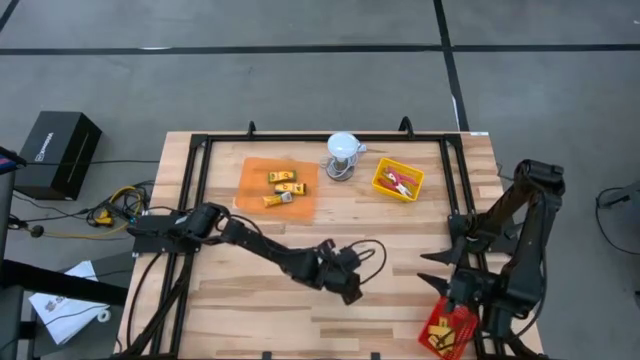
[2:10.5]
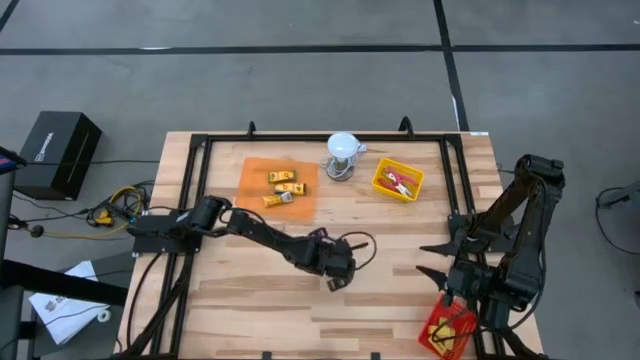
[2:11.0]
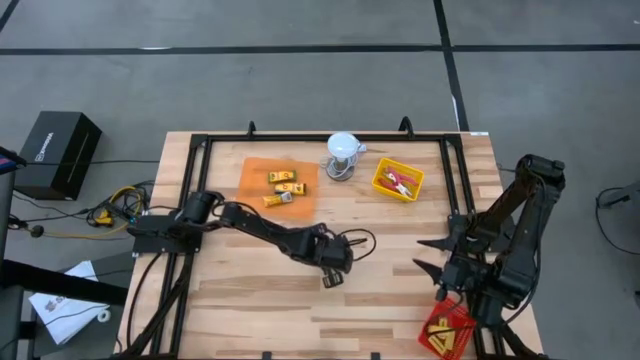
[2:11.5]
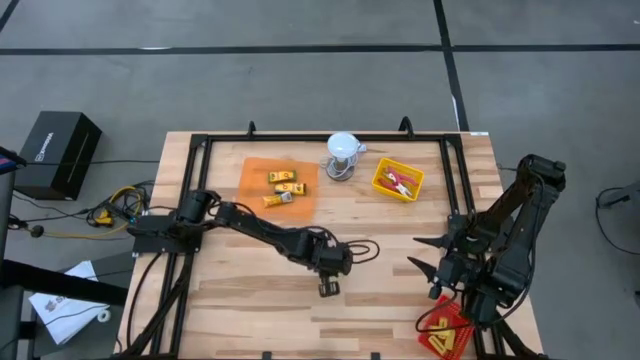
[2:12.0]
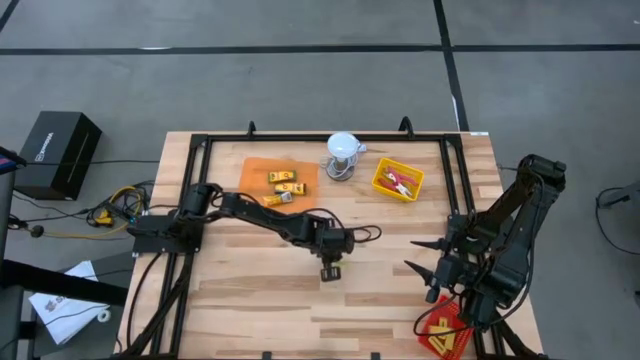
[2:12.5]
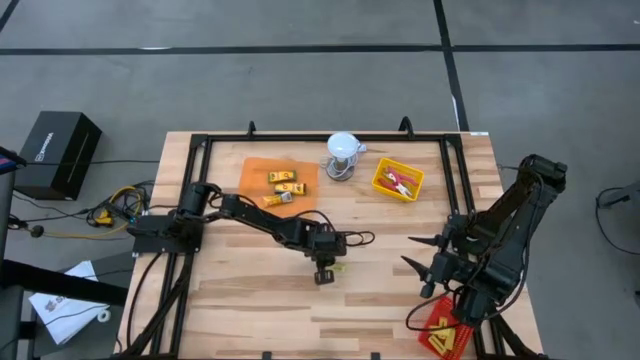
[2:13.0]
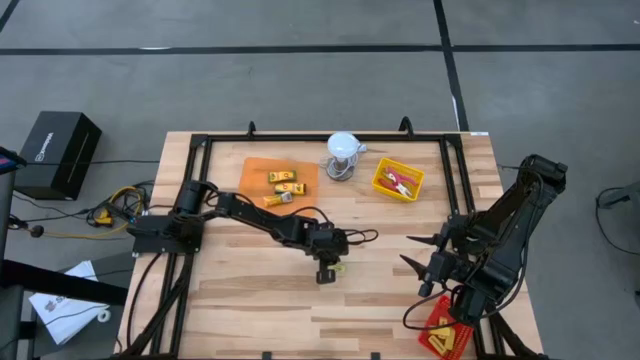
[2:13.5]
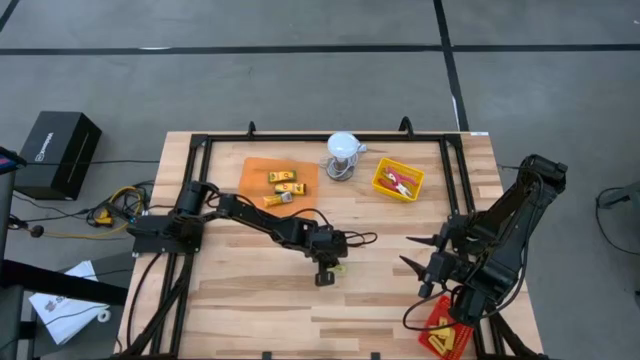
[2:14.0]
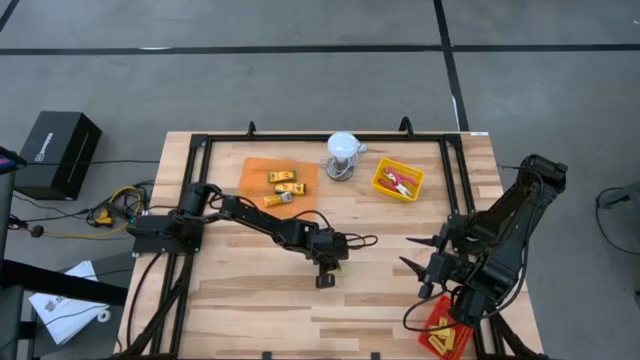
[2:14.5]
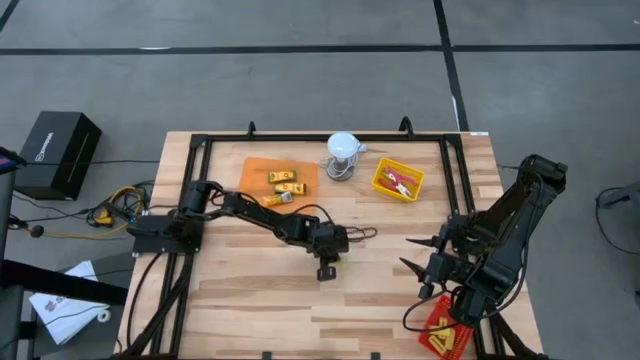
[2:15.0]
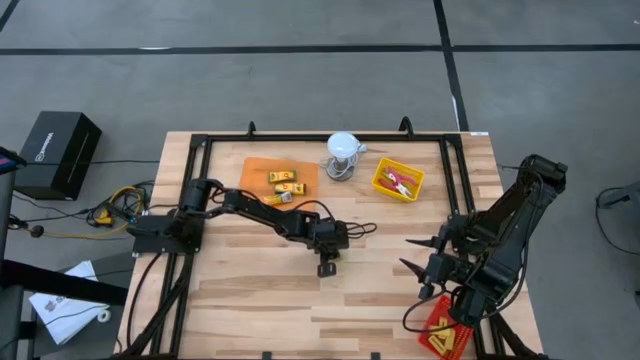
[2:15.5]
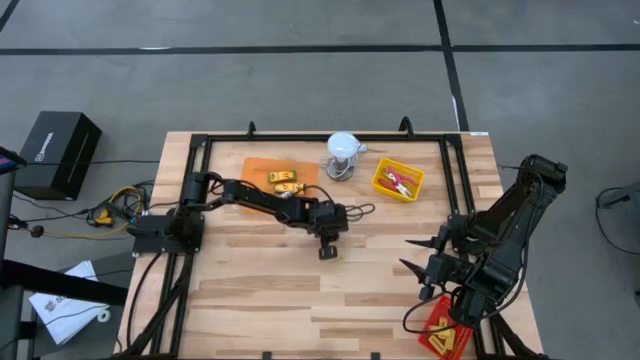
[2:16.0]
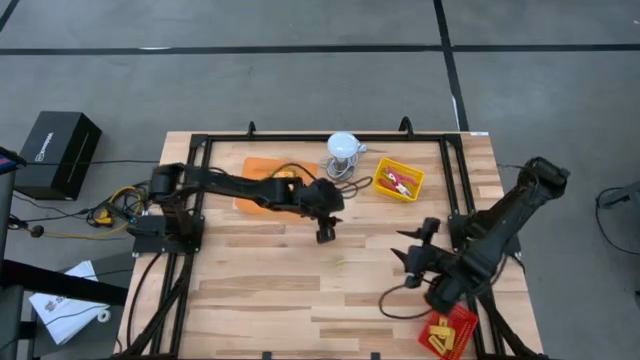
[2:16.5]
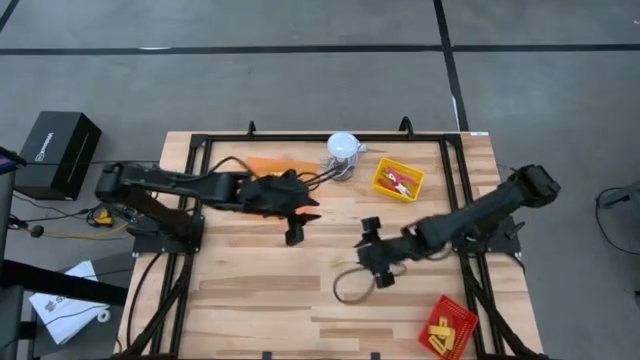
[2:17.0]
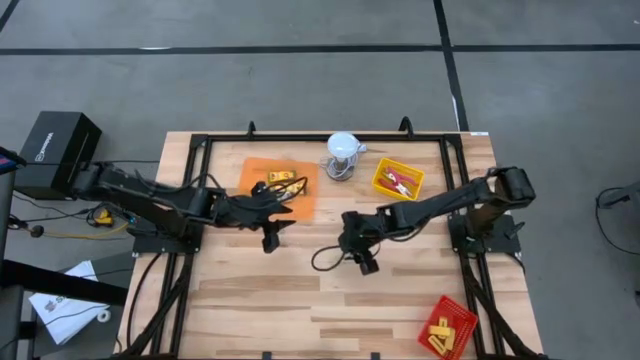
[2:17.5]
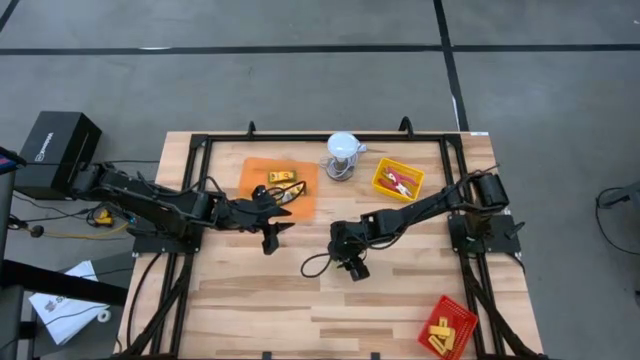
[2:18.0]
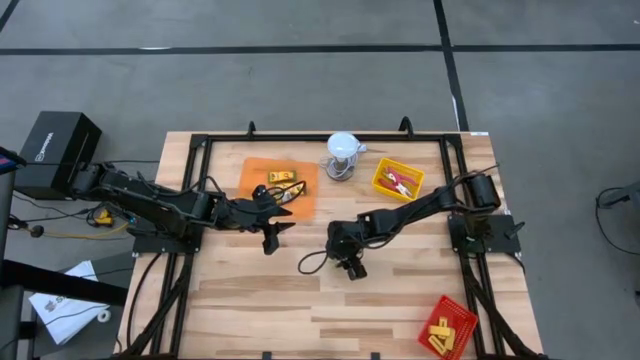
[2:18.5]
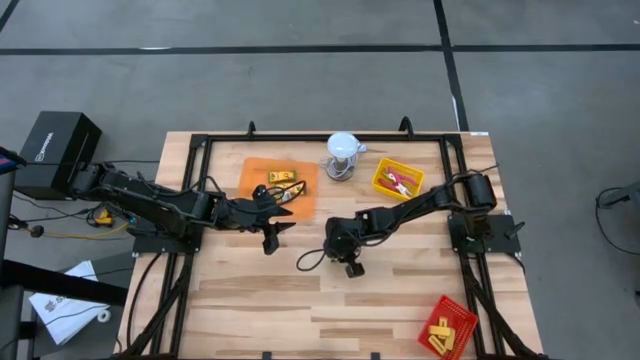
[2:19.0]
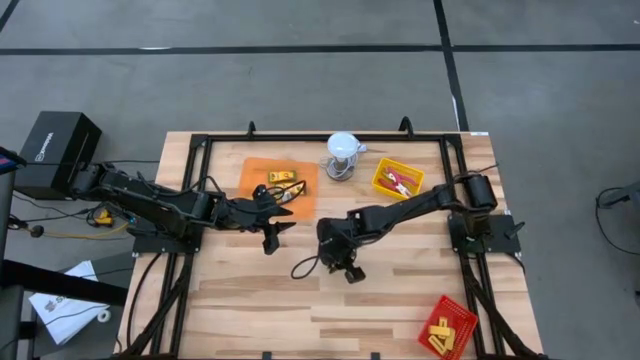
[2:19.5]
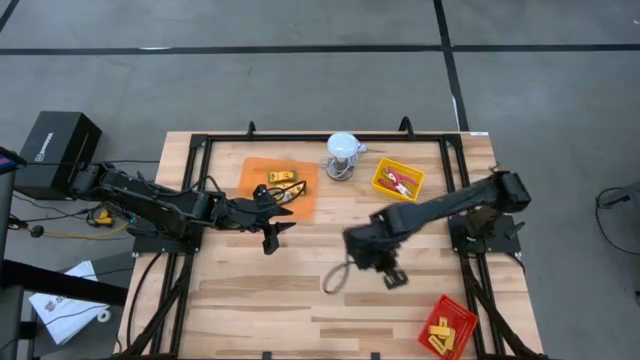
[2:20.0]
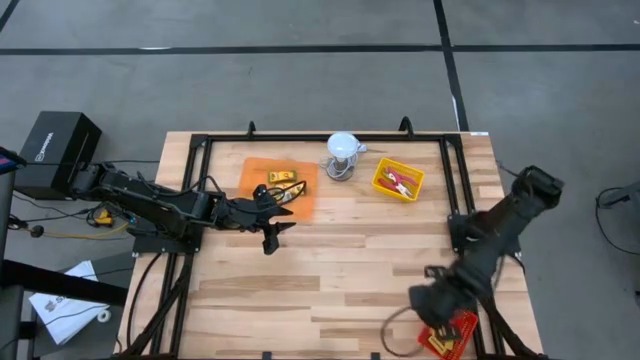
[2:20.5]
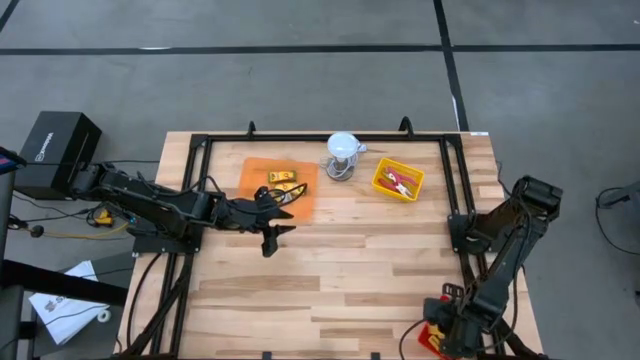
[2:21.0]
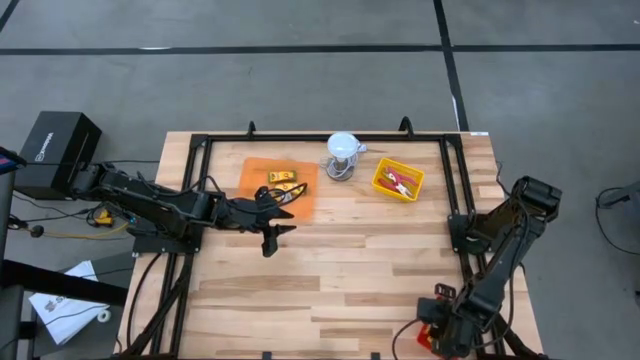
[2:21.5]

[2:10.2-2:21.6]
Task: Pick & Place School Supplies
Put the green eraser into the red bin

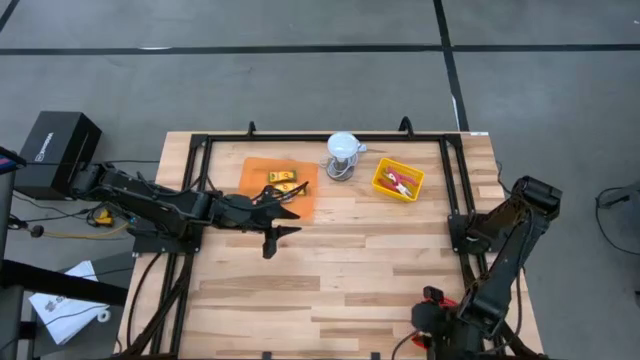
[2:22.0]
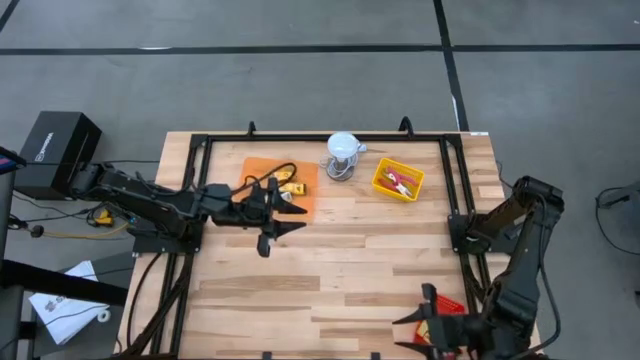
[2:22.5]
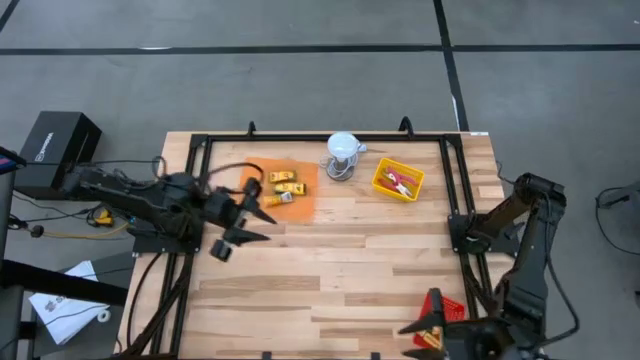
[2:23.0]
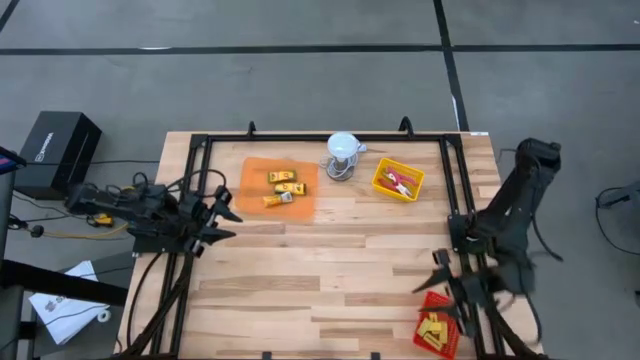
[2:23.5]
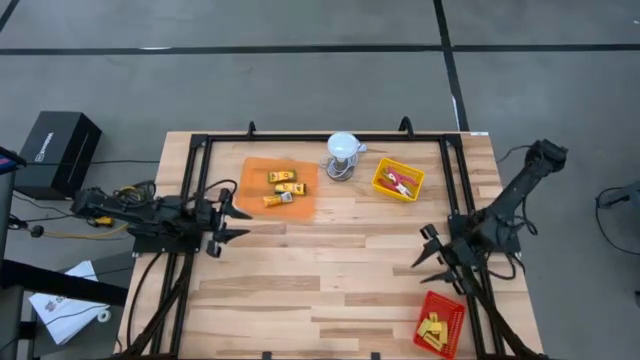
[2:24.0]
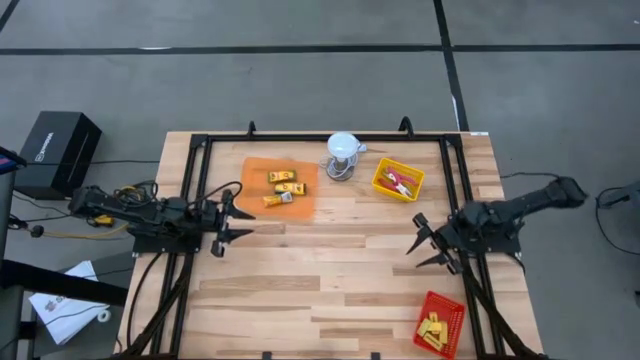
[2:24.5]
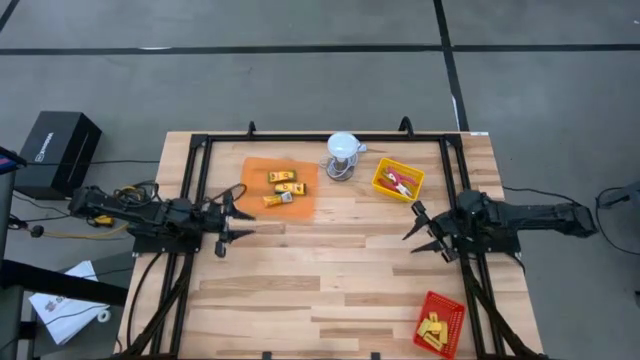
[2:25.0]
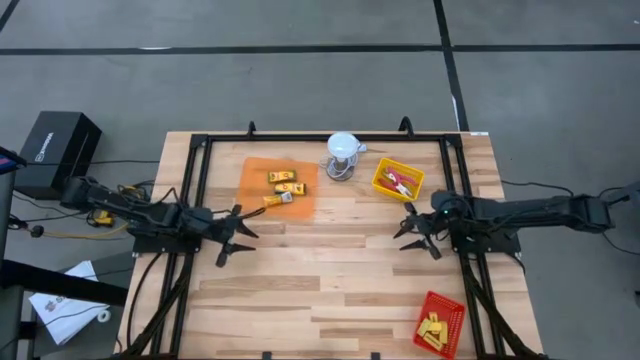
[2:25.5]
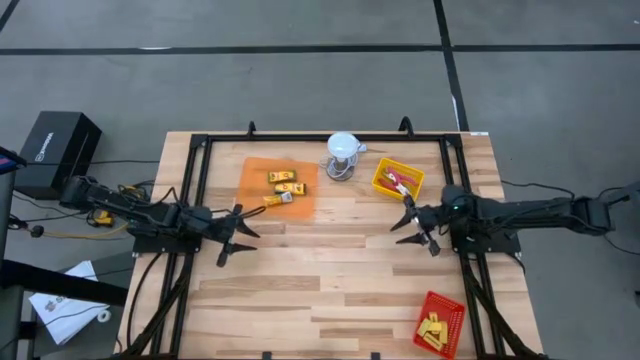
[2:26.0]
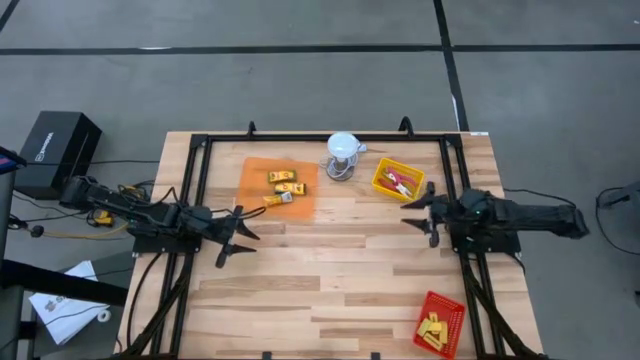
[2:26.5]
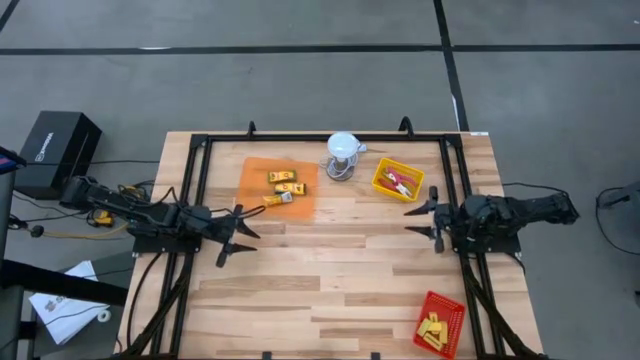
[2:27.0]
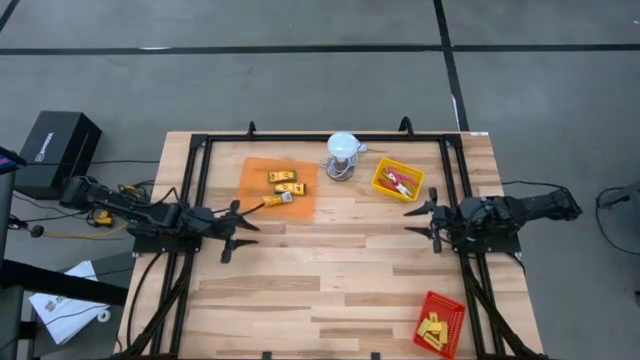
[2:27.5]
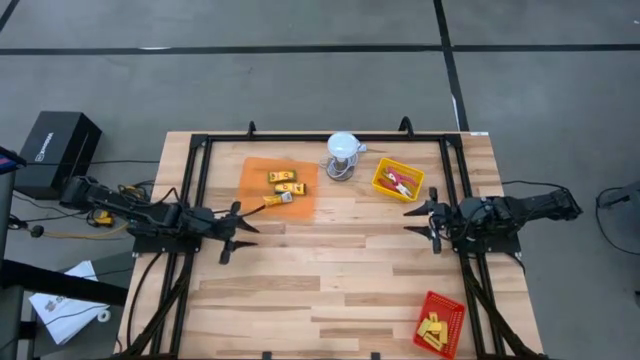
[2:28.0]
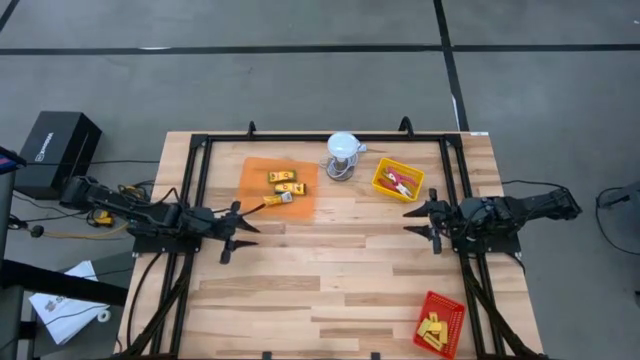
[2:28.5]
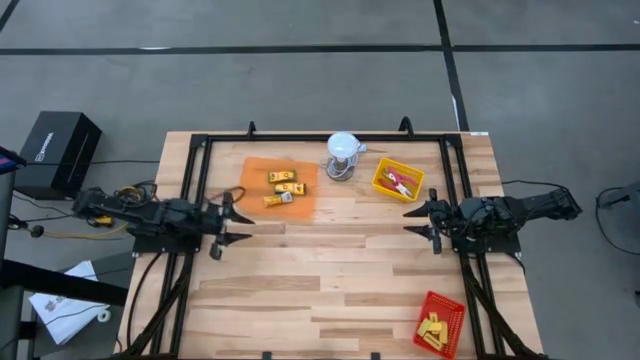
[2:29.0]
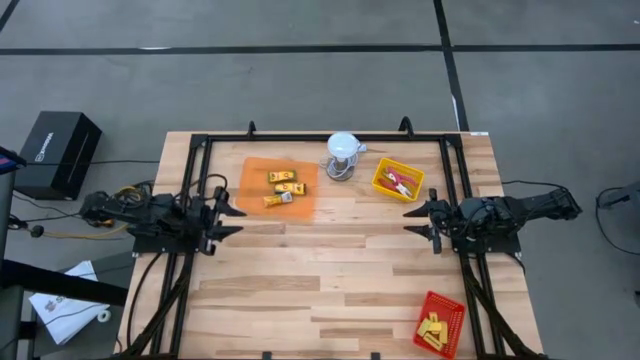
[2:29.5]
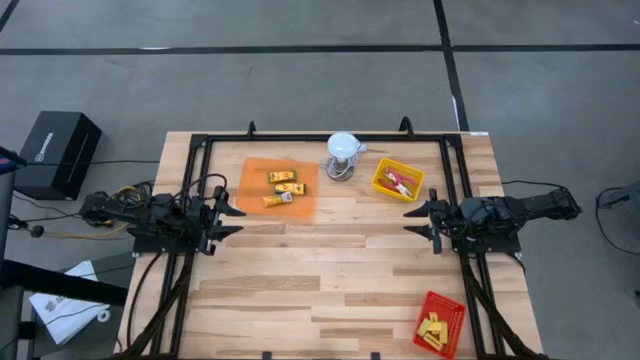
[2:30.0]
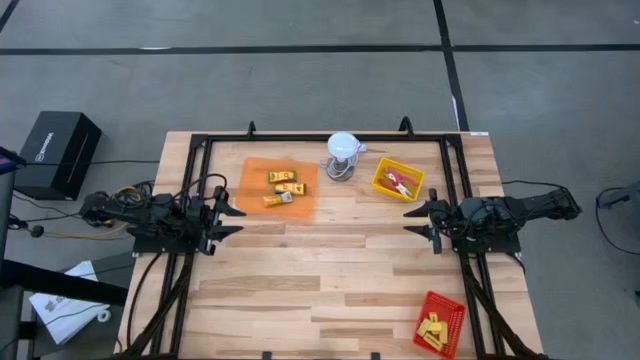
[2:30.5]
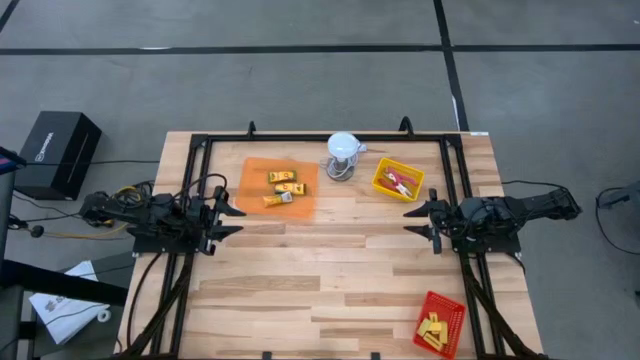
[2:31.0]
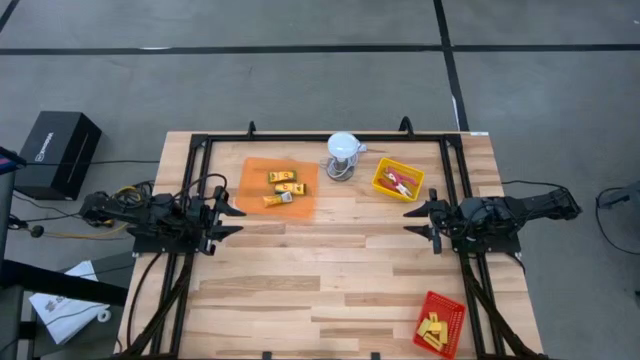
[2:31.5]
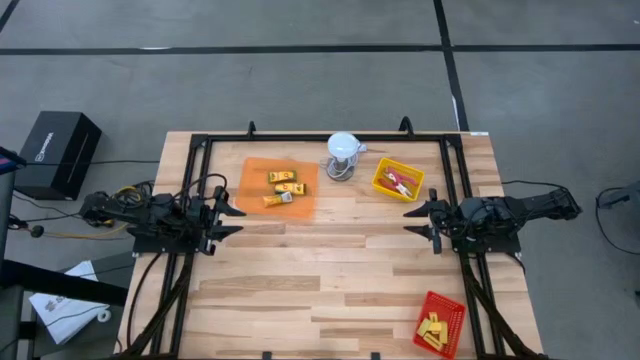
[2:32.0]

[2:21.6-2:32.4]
Return to Home Position
